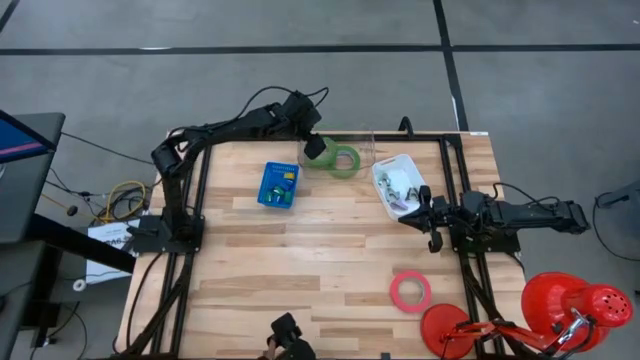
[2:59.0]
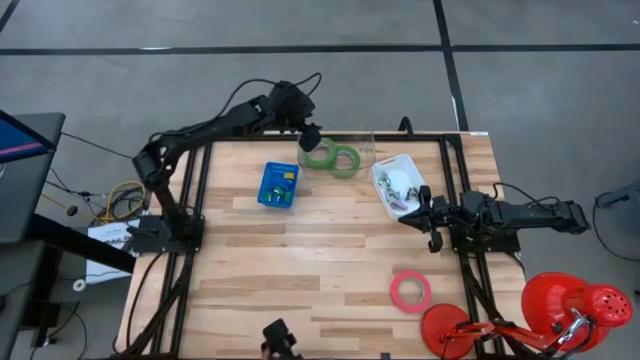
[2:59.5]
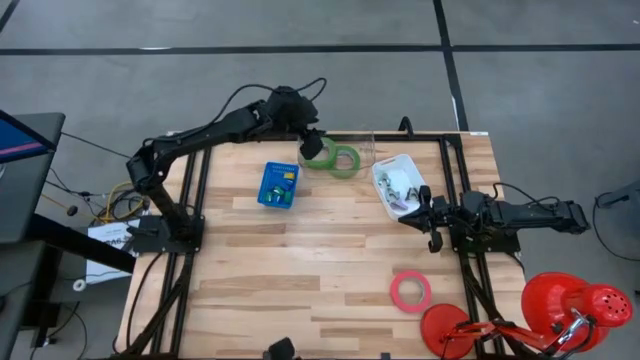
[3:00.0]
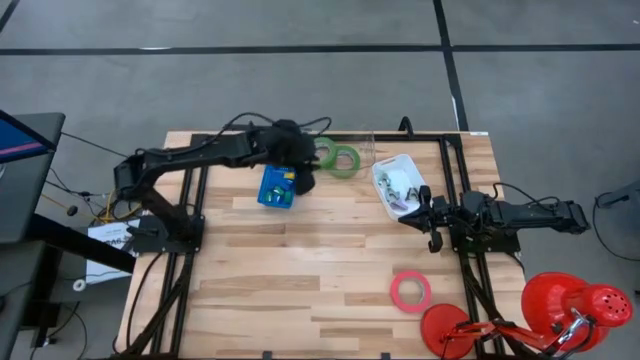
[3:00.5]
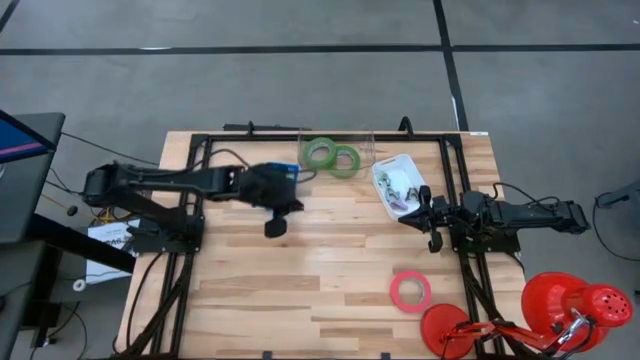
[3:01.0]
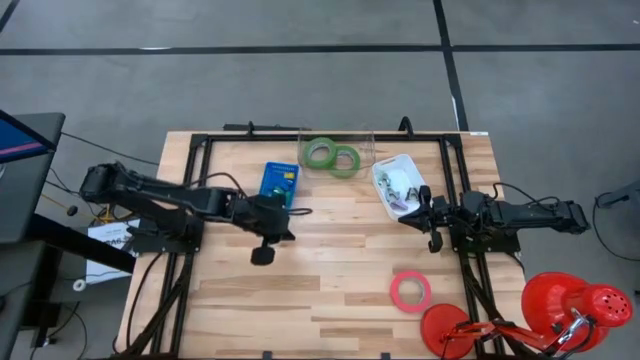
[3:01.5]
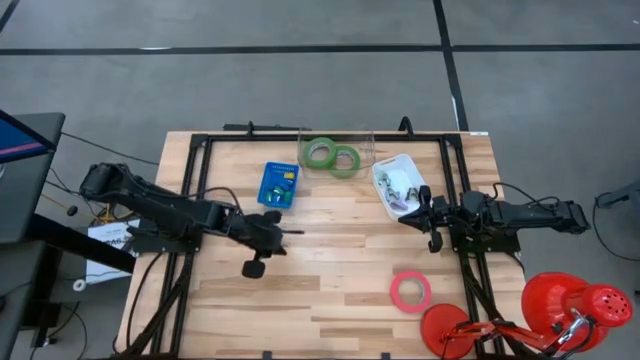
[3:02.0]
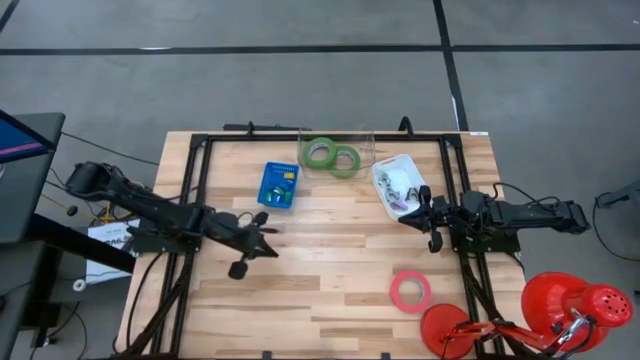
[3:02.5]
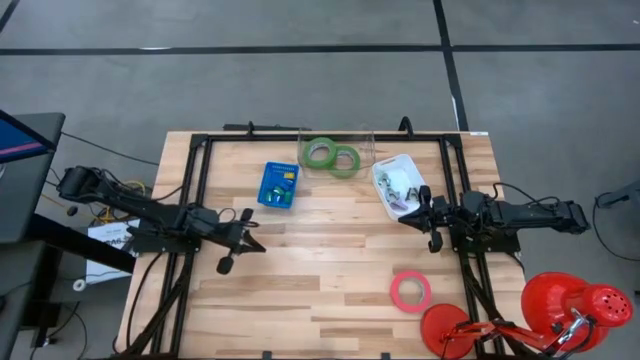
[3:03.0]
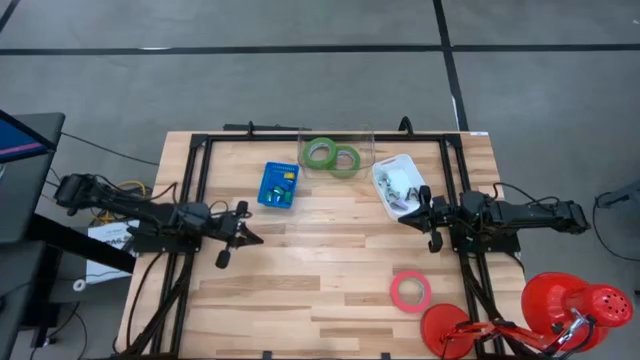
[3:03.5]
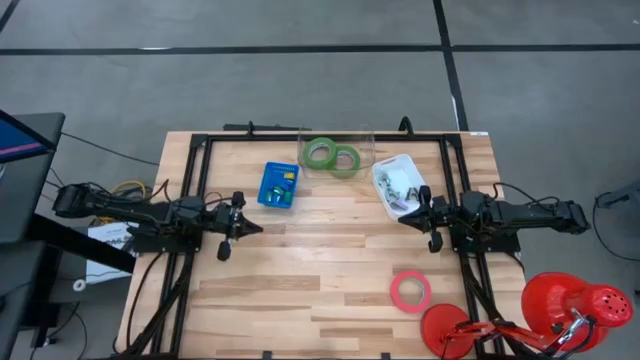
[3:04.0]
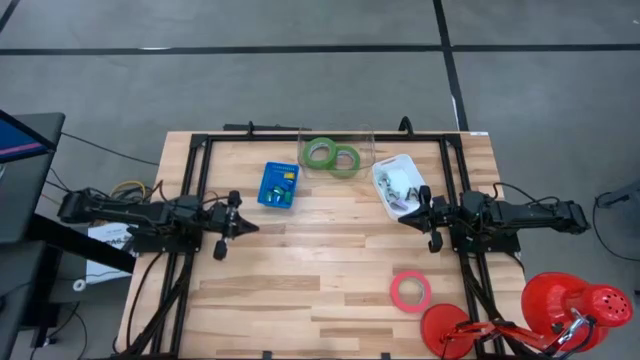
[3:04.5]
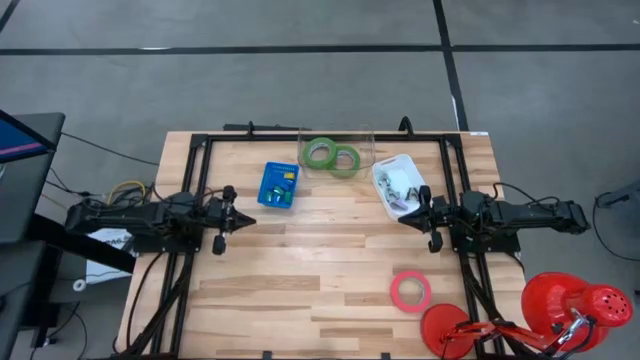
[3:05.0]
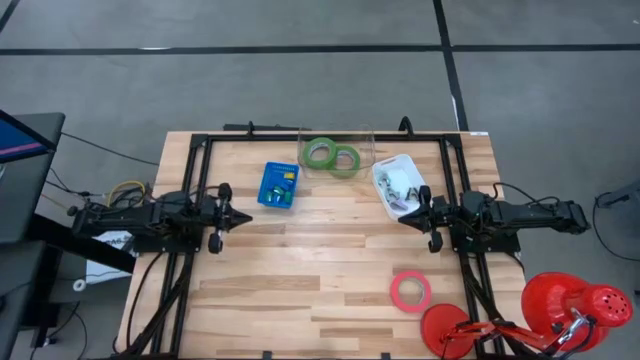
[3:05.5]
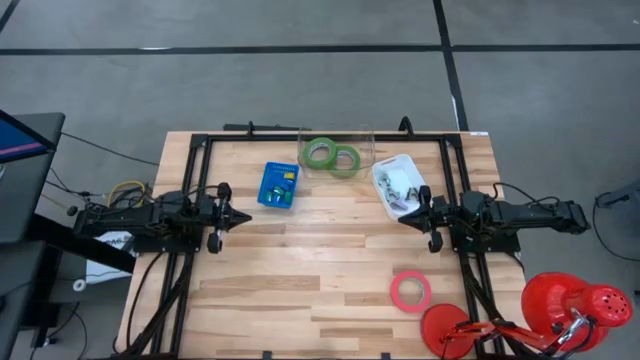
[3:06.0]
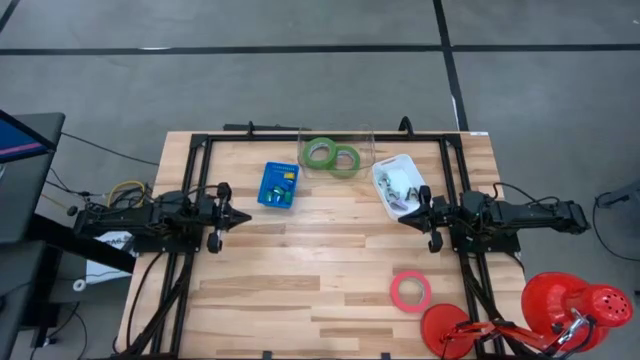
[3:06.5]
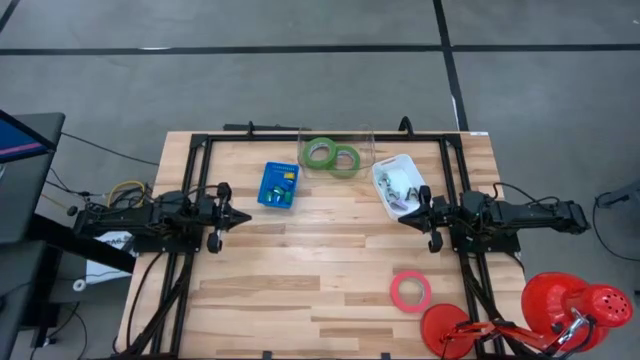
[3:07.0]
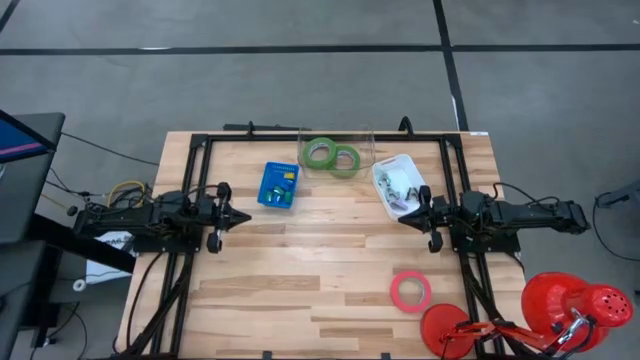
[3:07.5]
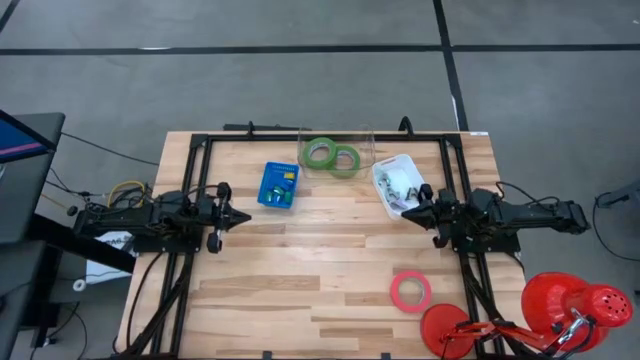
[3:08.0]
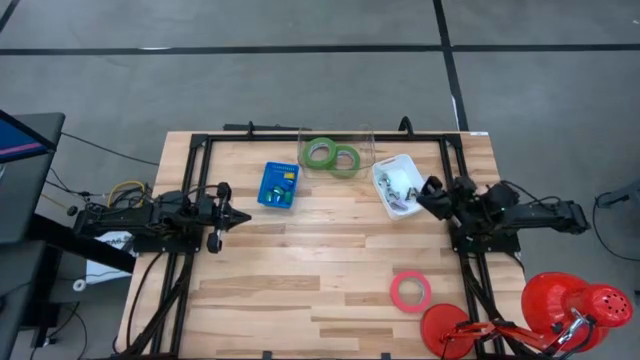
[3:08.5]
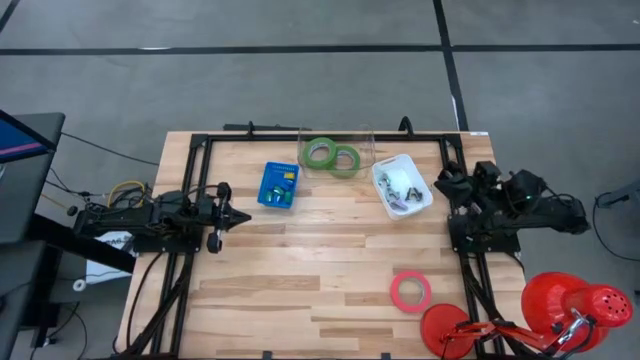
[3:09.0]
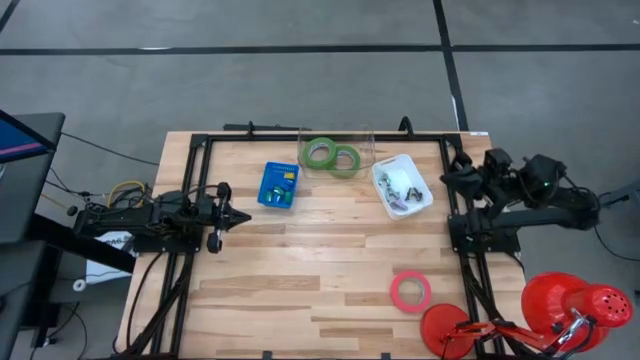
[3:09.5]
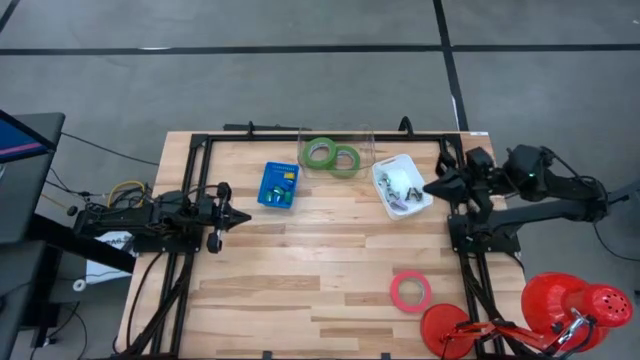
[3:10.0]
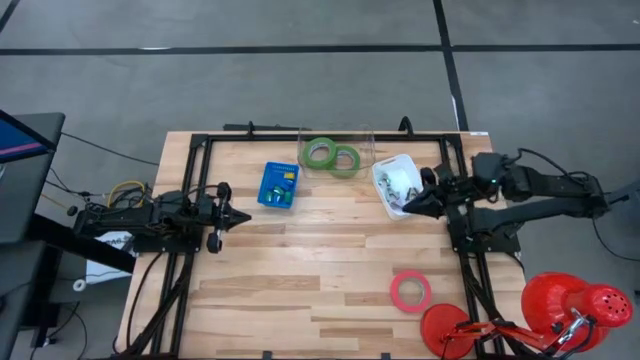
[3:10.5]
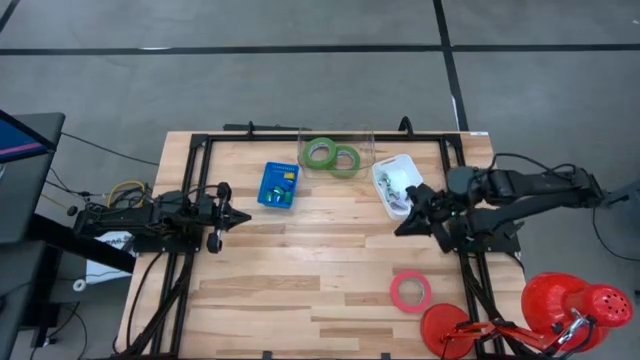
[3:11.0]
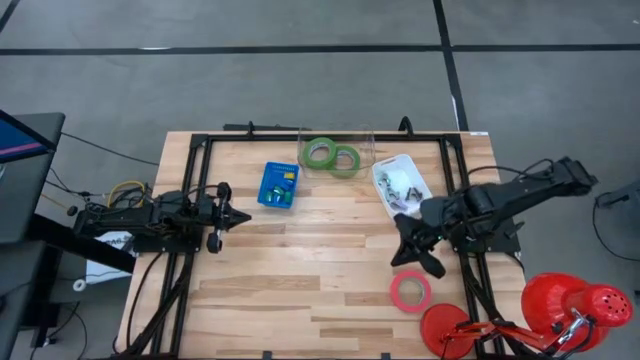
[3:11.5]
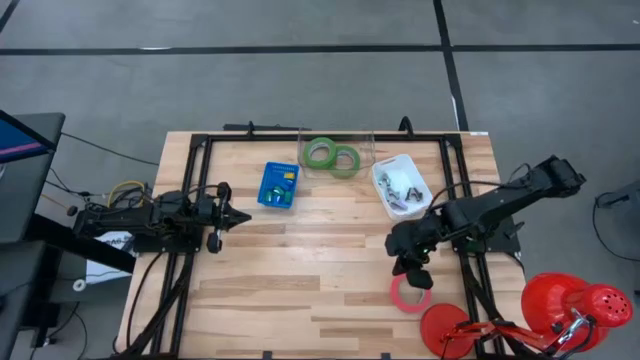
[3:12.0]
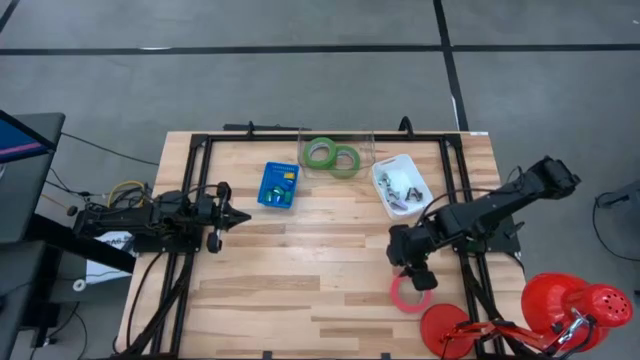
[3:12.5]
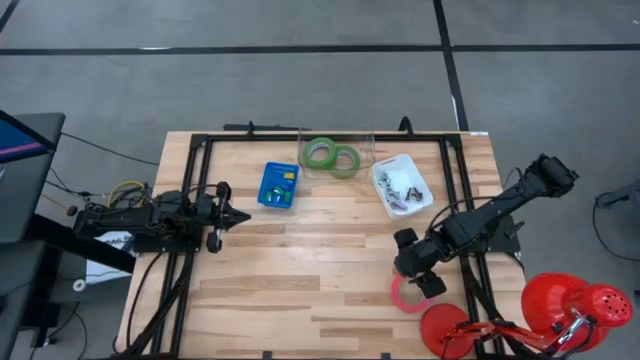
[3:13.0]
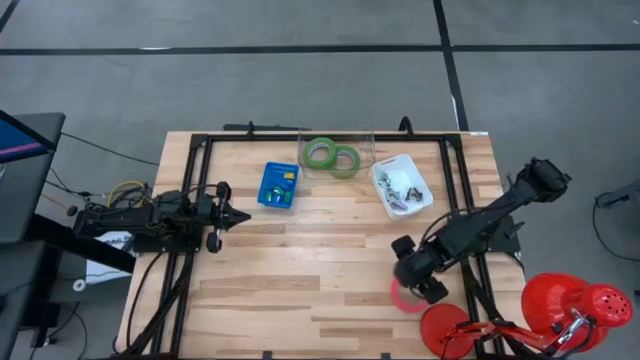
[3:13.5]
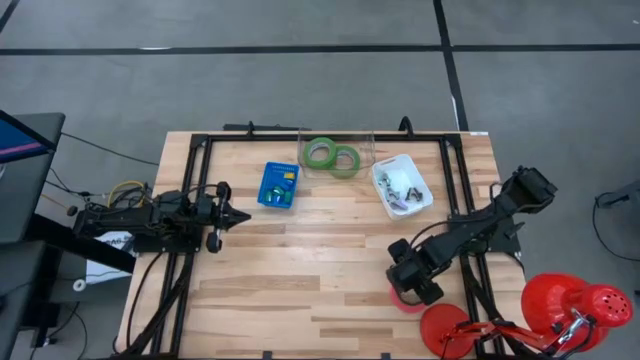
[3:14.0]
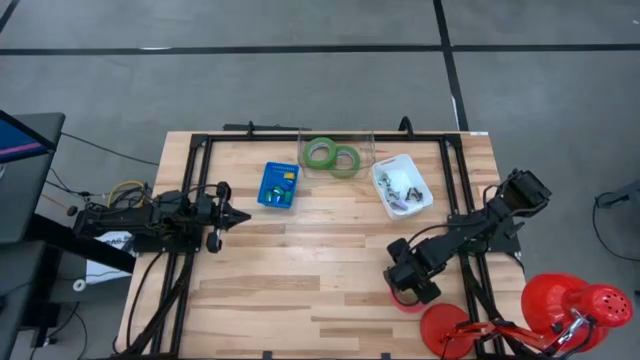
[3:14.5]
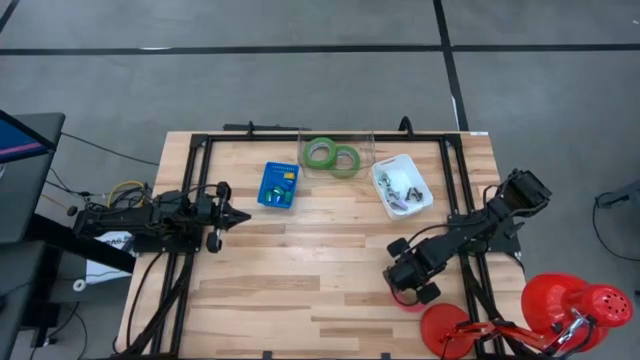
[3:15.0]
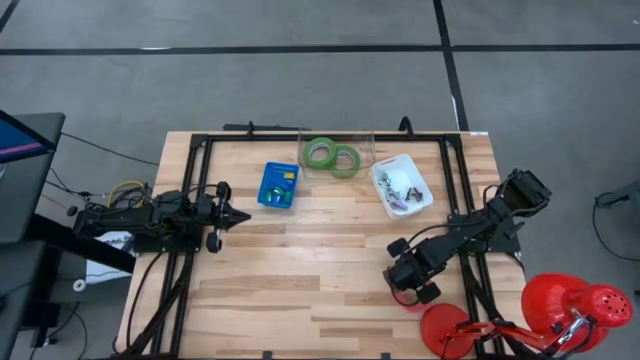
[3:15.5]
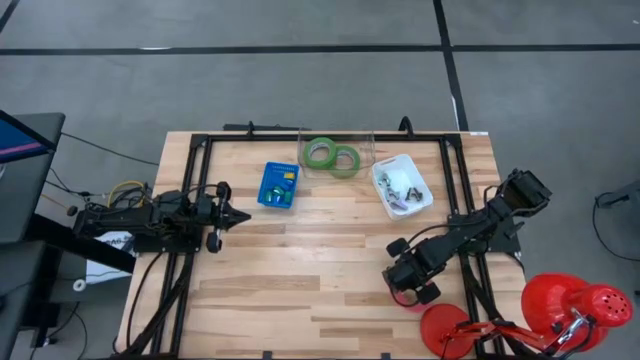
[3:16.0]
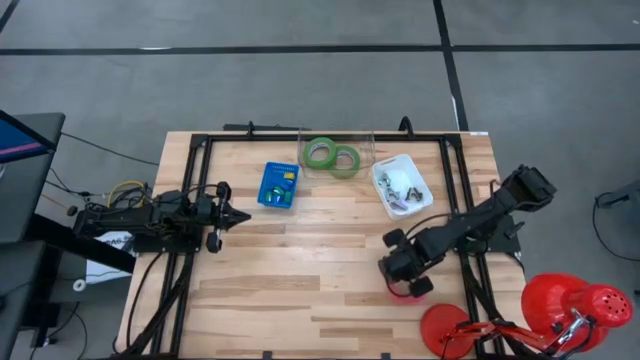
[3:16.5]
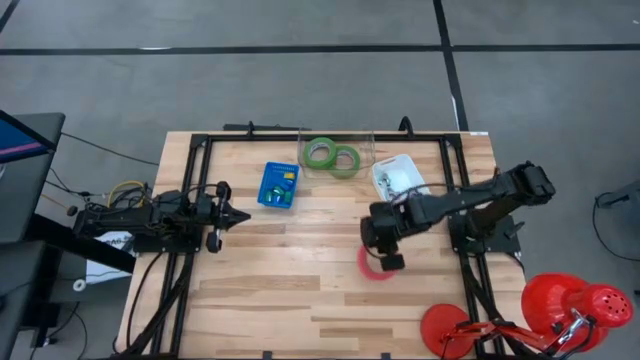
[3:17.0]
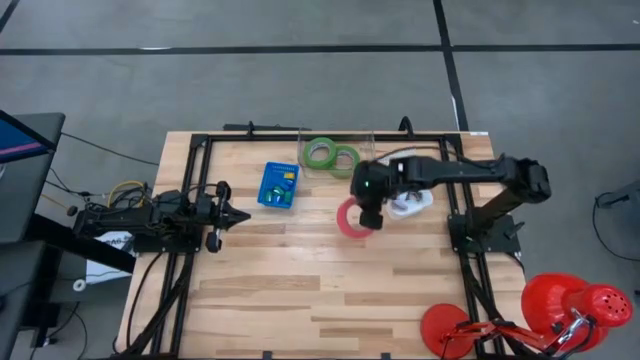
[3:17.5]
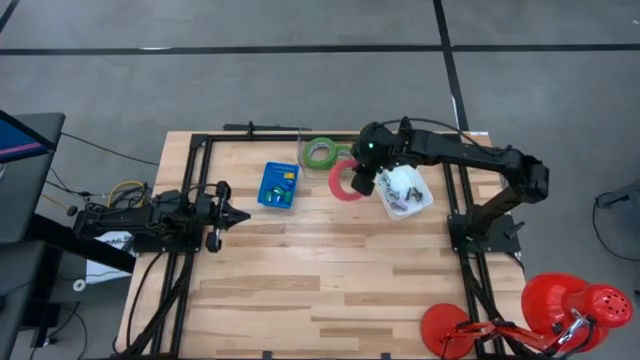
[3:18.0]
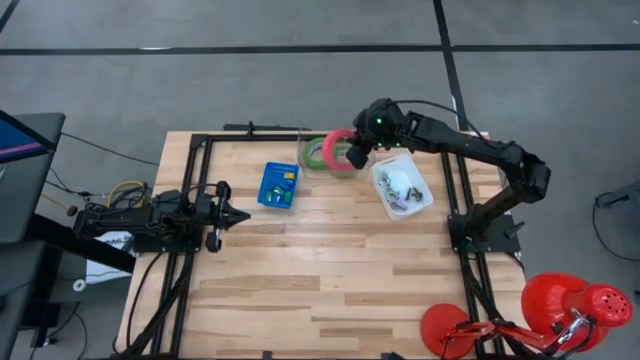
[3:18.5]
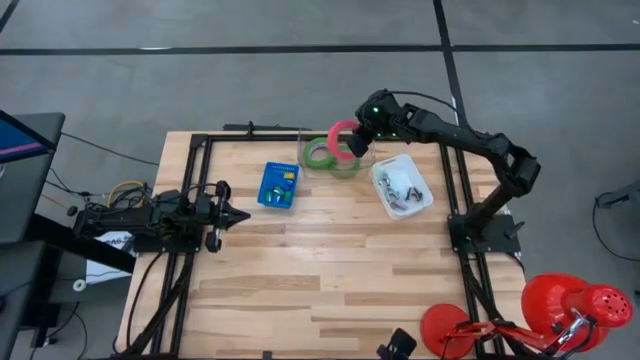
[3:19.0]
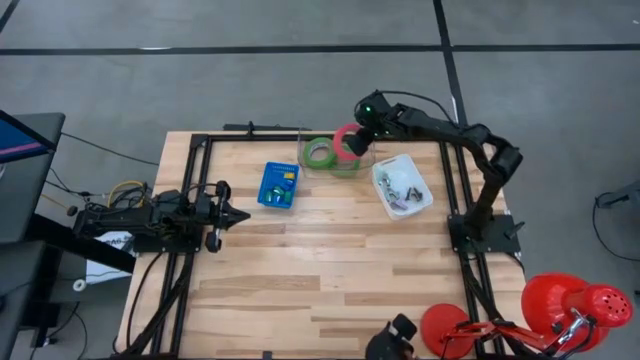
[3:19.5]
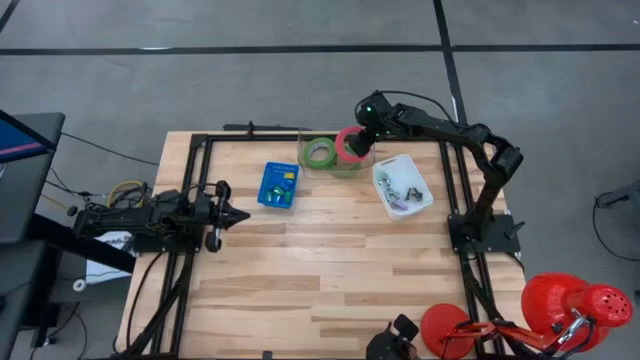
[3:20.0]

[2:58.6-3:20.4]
Task: Pick and place Stapler, Stapler remover, tape
Put the pink tape into the transparent bin

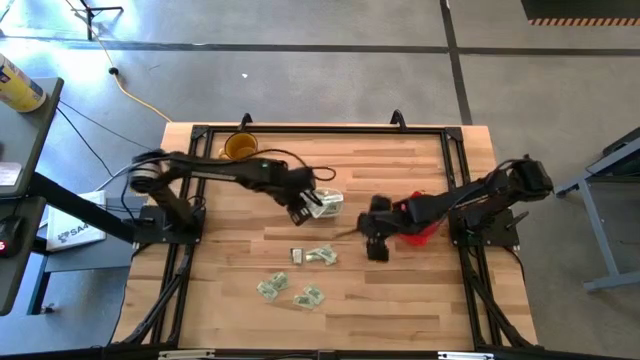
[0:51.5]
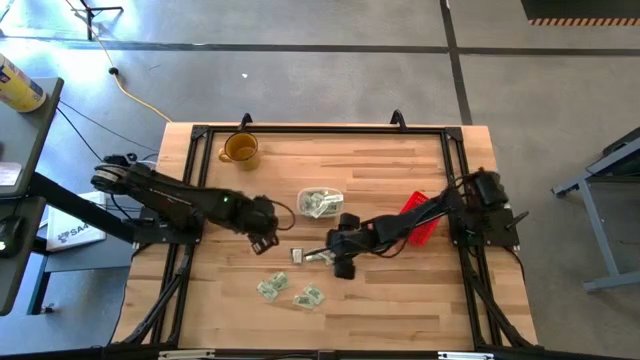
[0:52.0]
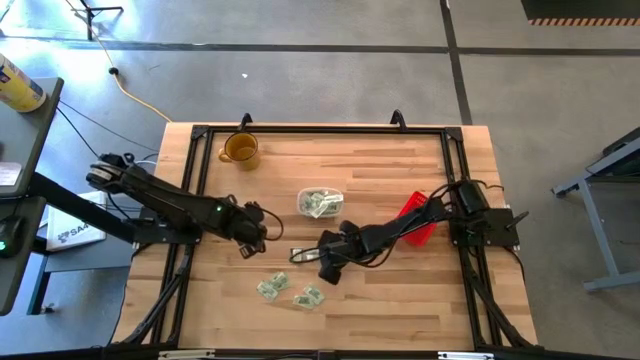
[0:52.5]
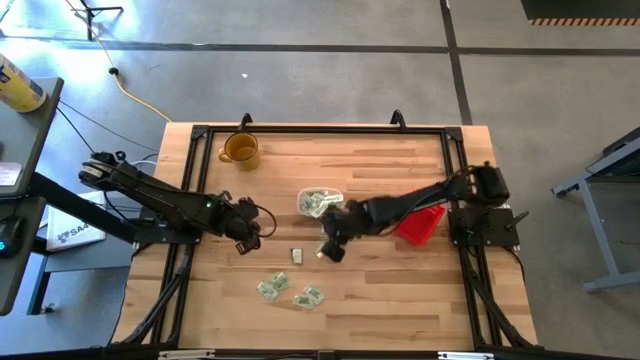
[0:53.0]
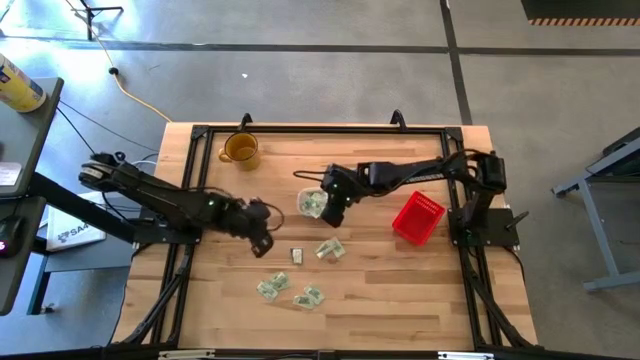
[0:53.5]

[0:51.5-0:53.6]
Task: Pick and place items into bin
Put the white stevia packet into the transparent bin
